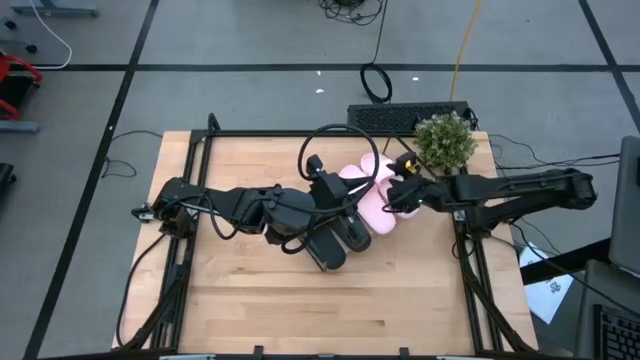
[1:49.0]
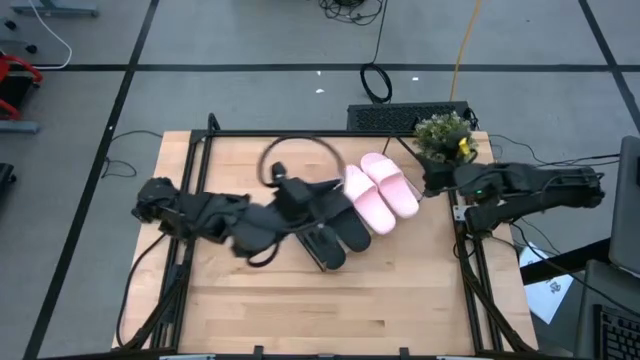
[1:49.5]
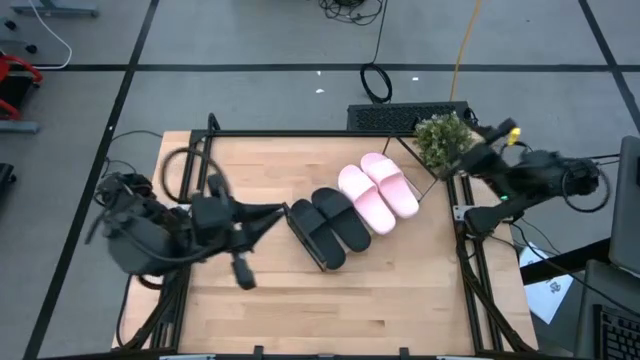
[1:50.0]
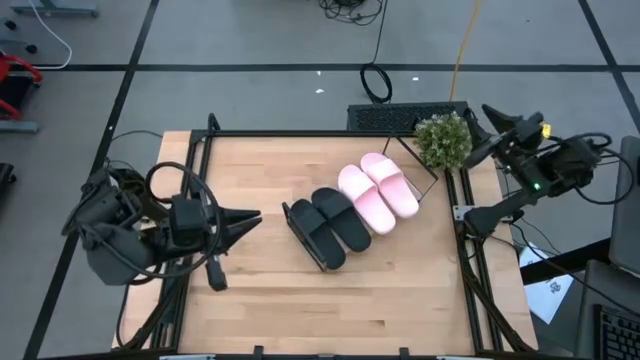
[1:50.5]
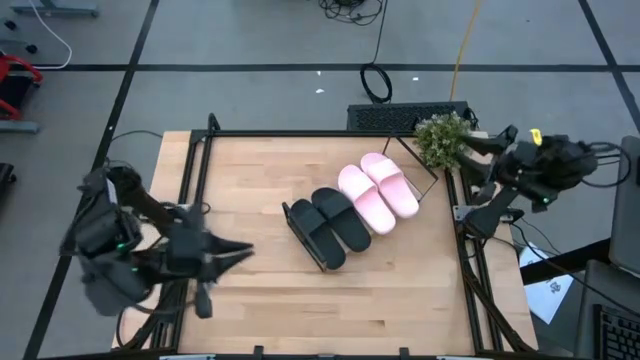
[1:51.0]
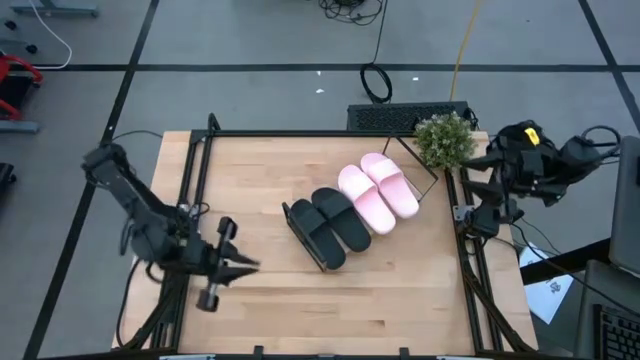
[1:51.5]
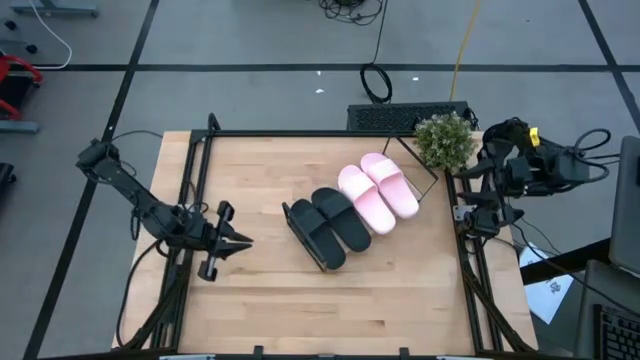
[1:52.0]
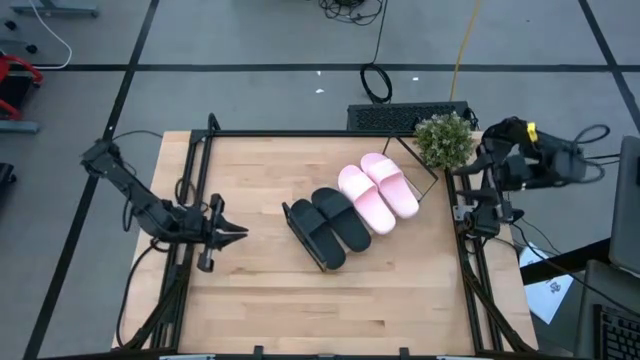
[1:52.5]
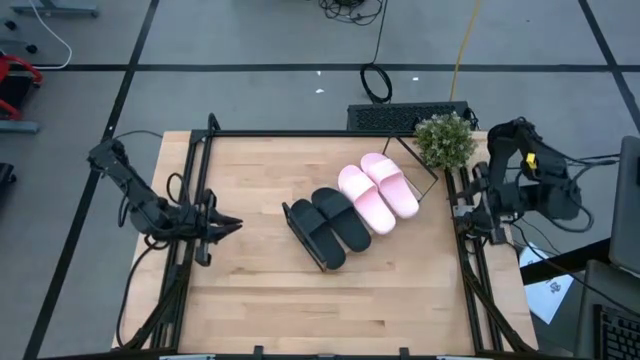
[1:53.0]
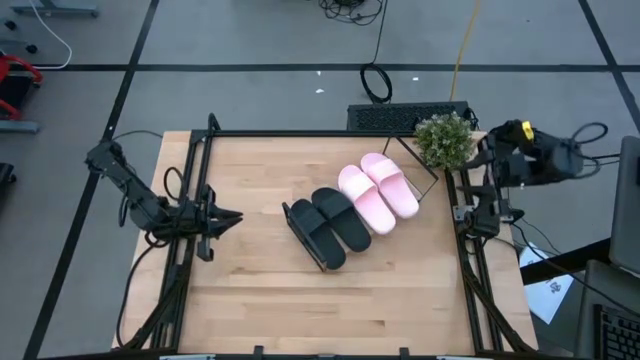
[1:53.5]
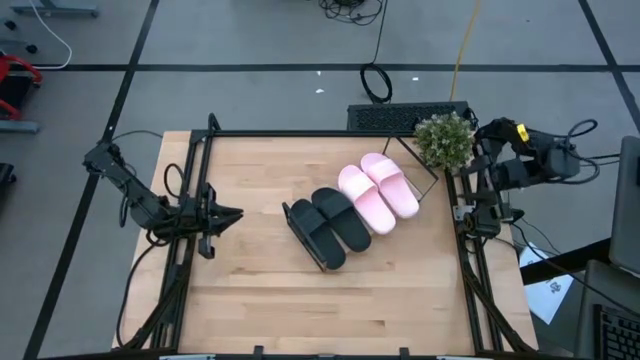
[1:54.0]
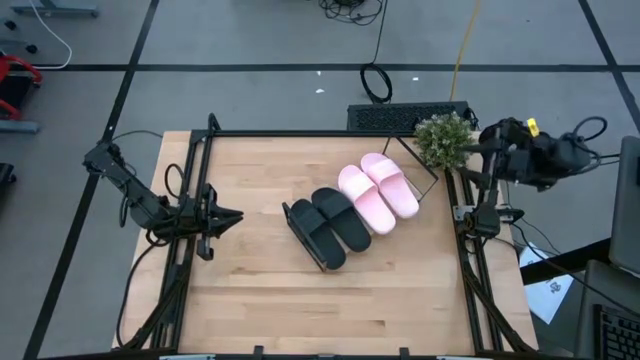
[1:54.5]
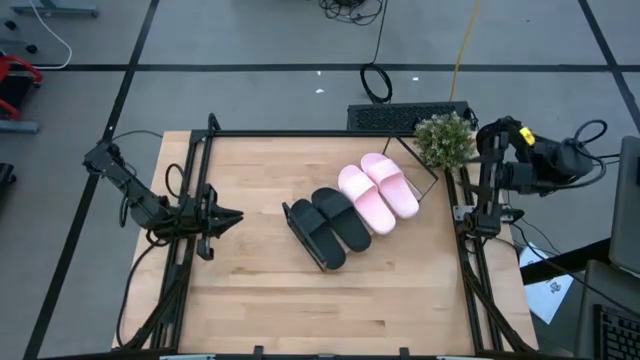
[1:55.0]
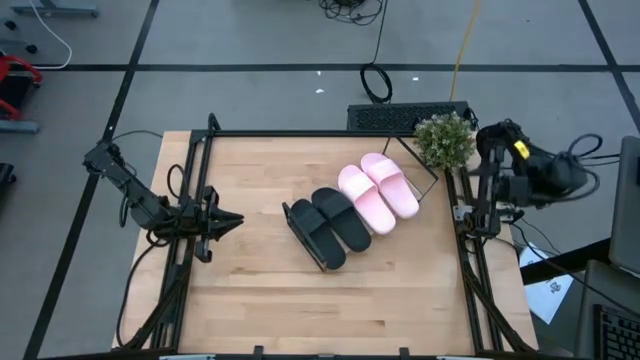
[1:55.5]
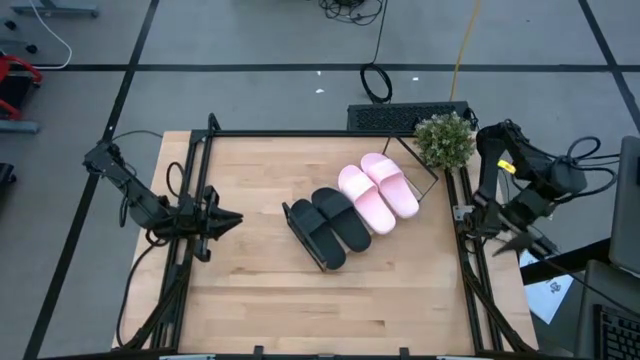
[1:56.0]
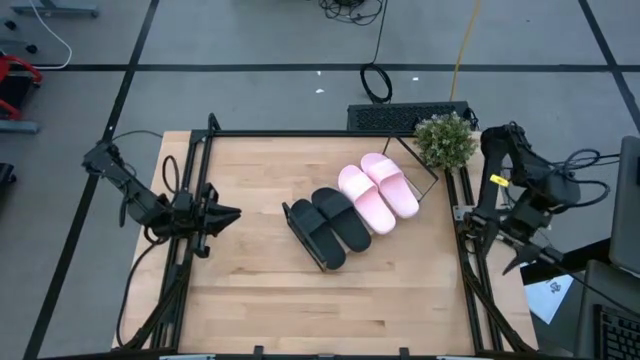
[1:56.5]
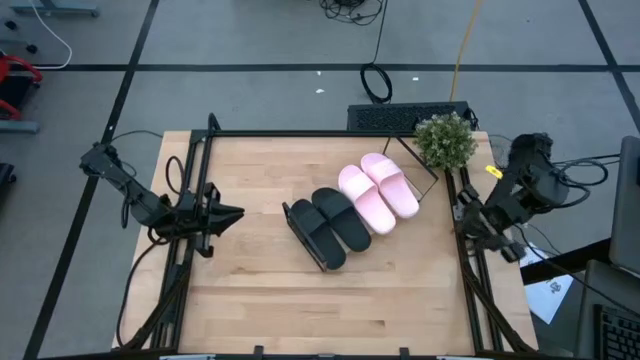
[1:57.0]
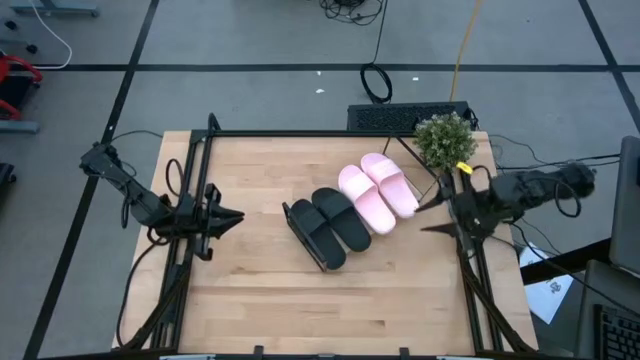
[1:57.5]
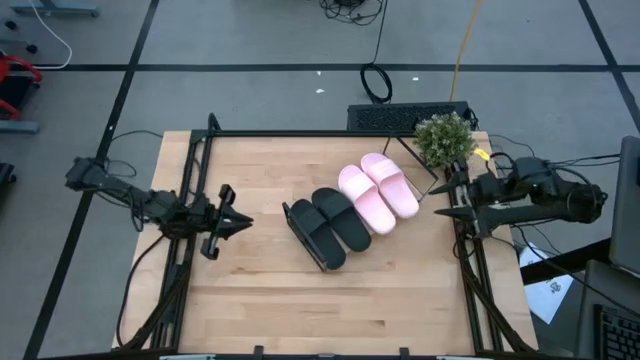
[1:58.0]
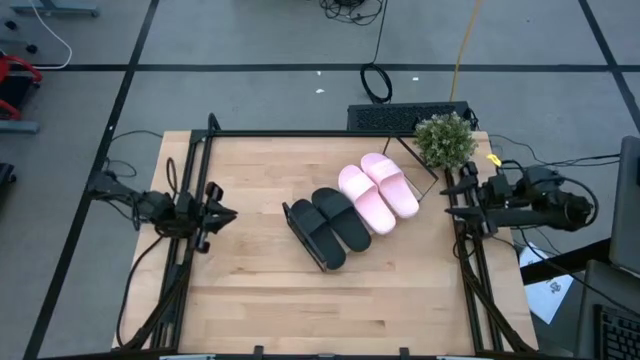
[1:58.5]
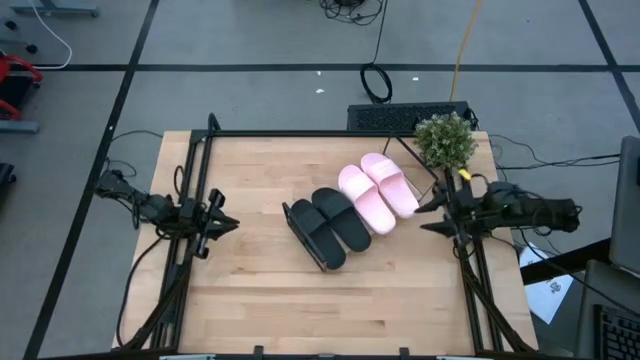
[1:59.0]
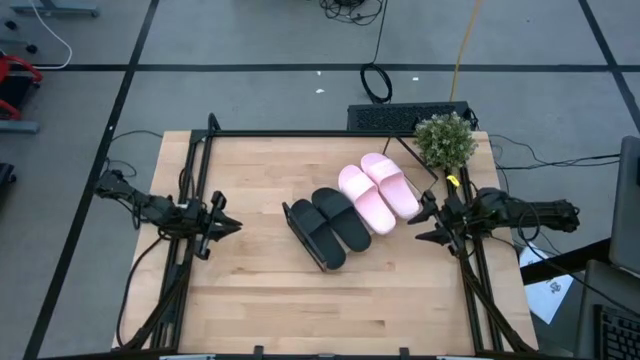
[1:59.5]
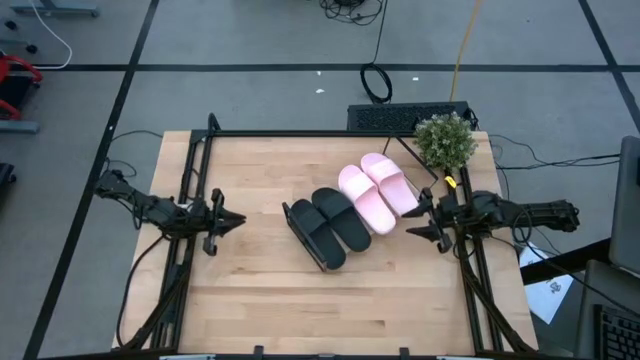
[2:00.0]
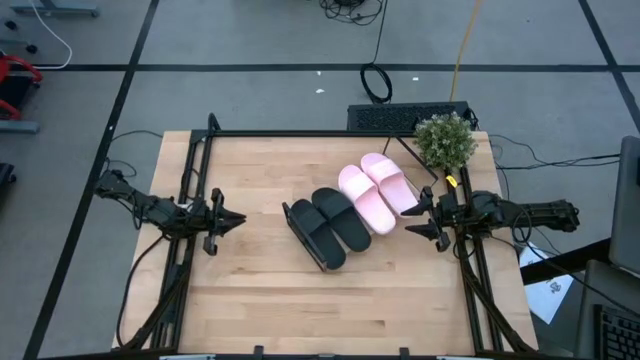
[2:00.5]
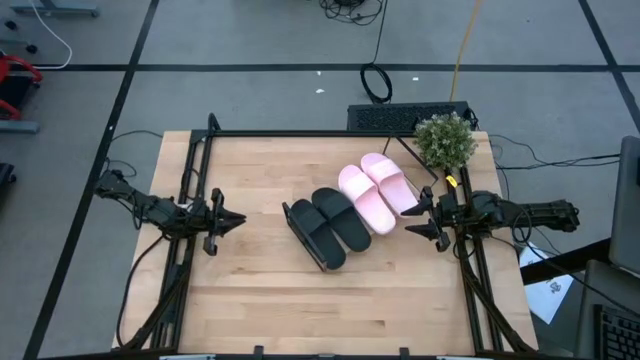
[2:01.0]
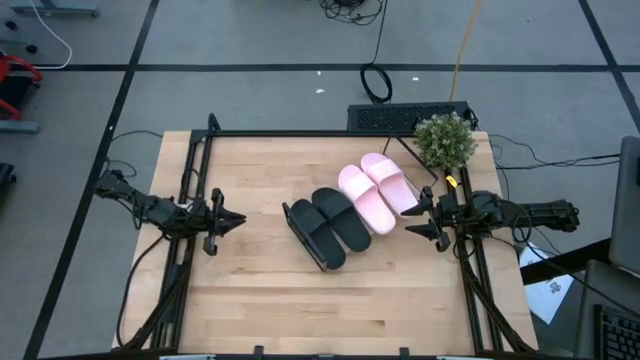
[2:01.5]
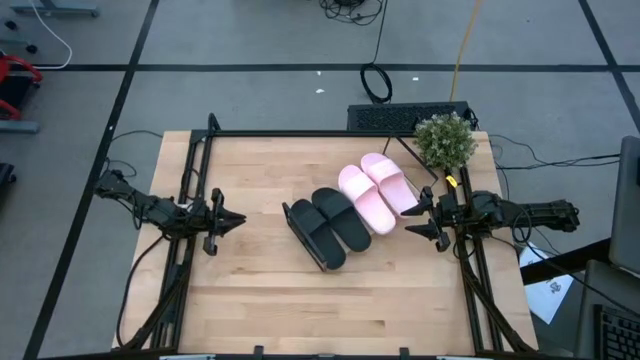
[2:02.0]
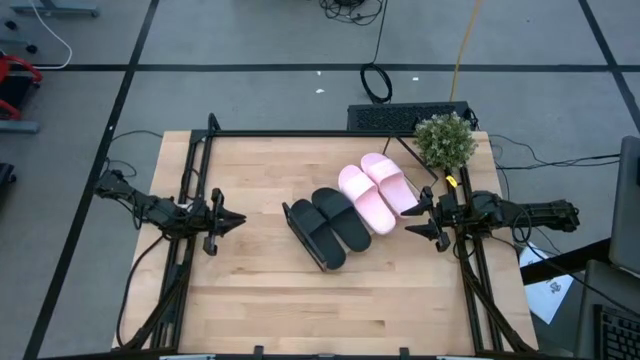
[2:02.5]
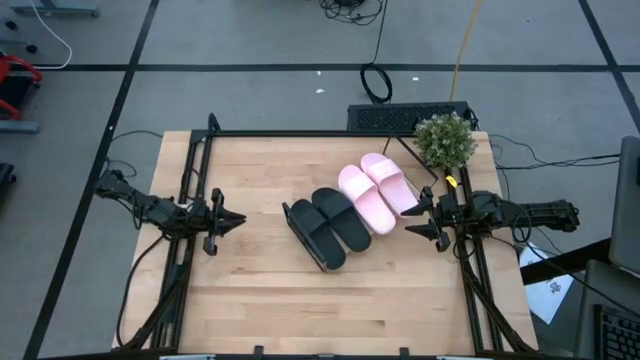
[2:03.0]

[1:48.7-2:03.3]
Task: Pick and place slides into the shelf
Return to Home Position

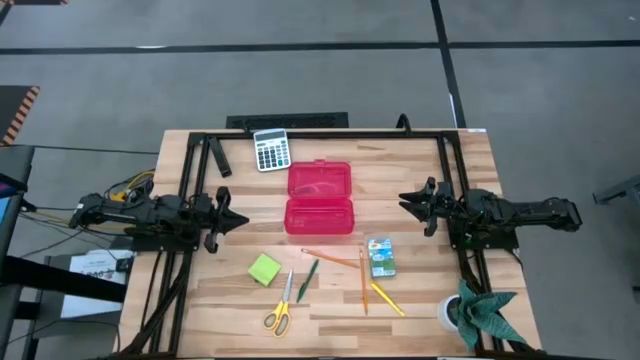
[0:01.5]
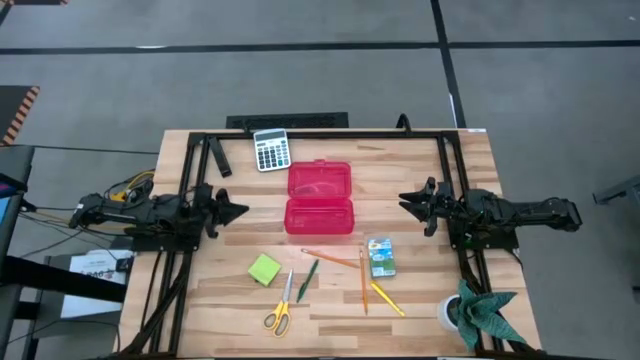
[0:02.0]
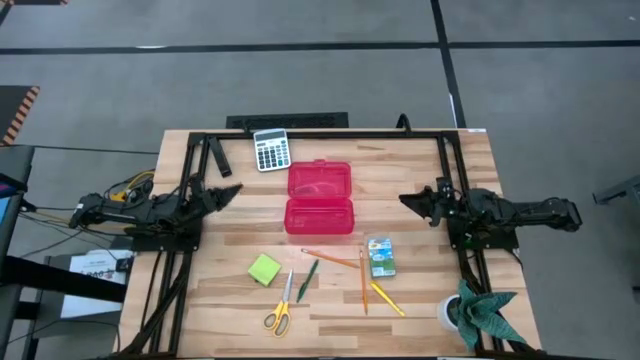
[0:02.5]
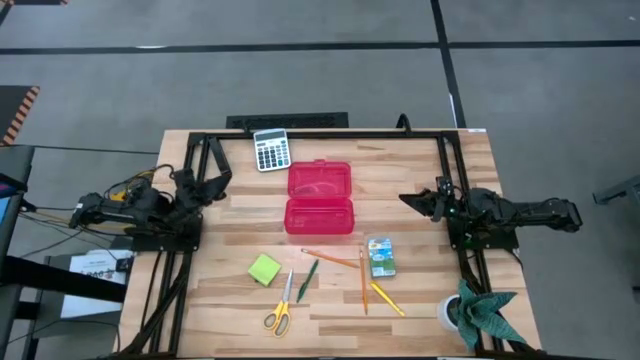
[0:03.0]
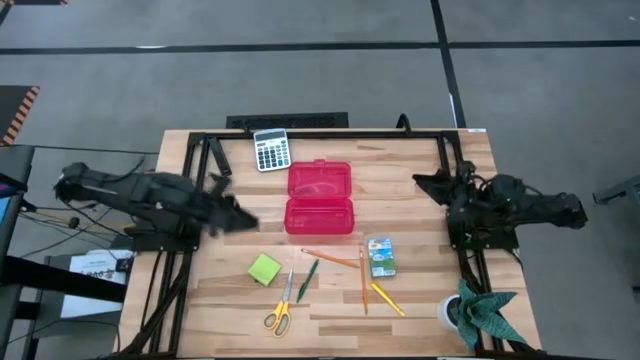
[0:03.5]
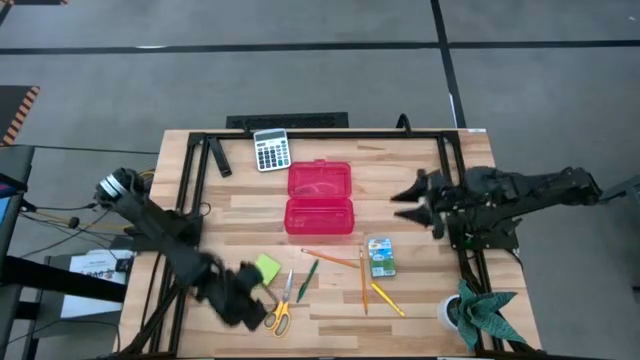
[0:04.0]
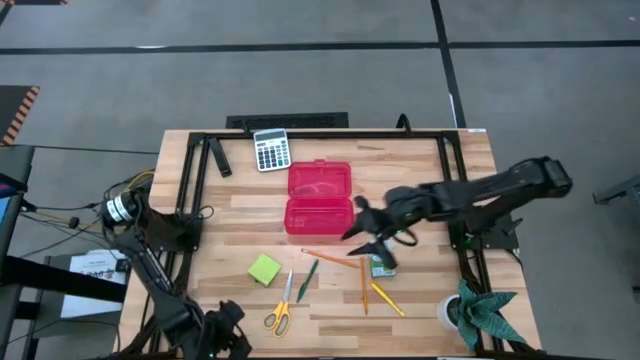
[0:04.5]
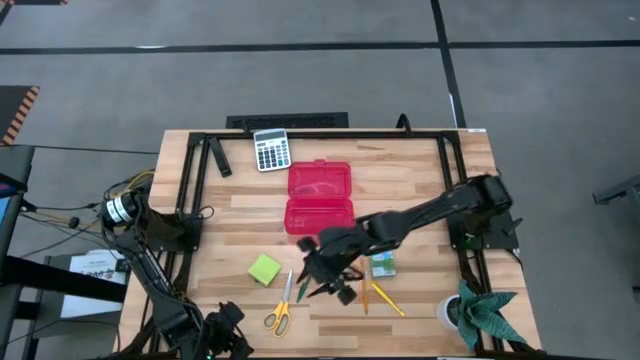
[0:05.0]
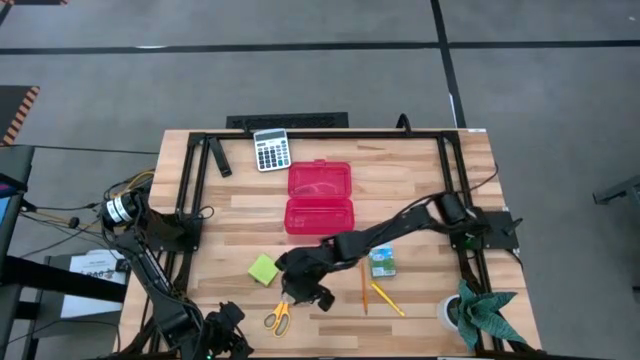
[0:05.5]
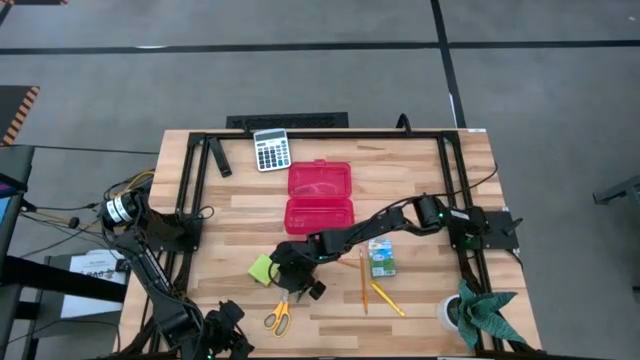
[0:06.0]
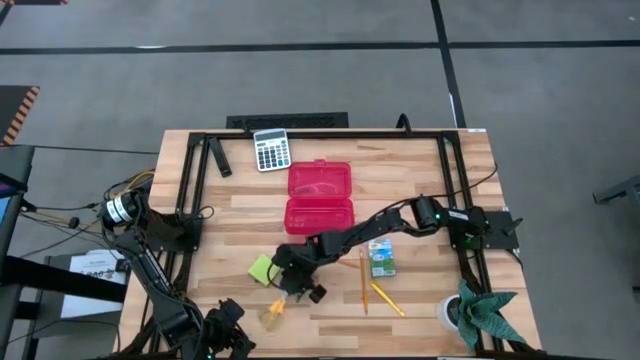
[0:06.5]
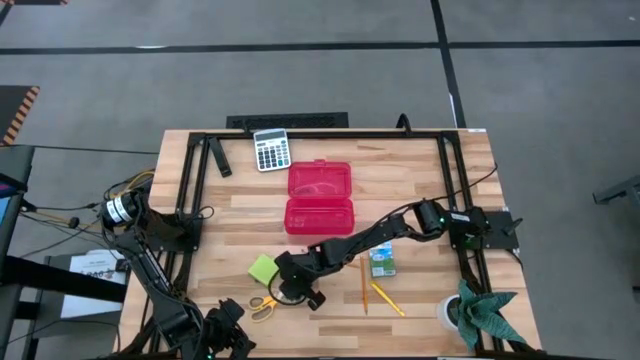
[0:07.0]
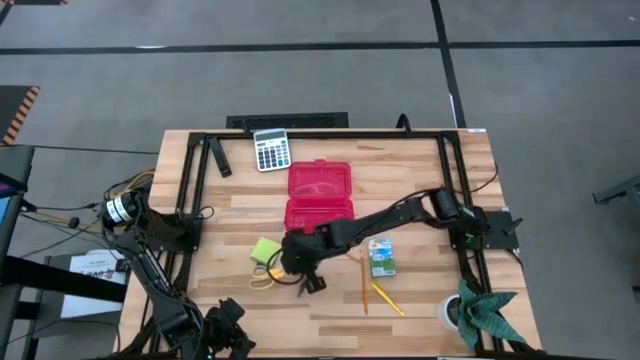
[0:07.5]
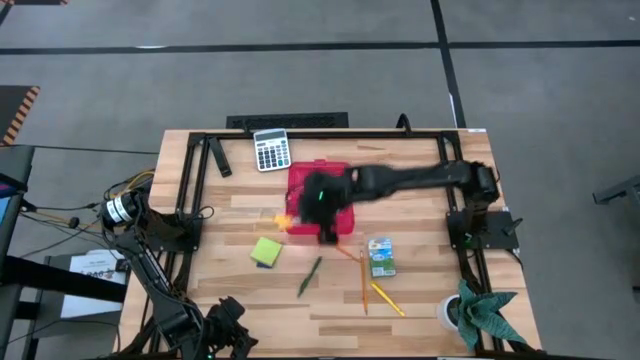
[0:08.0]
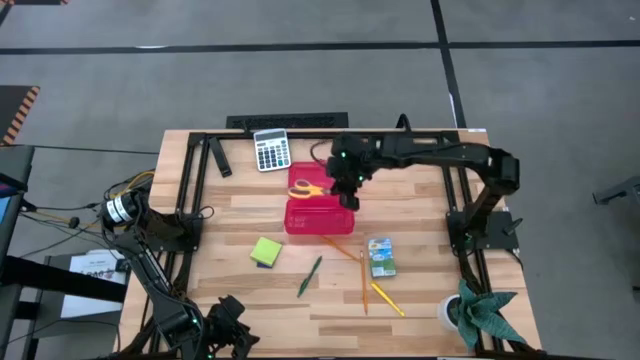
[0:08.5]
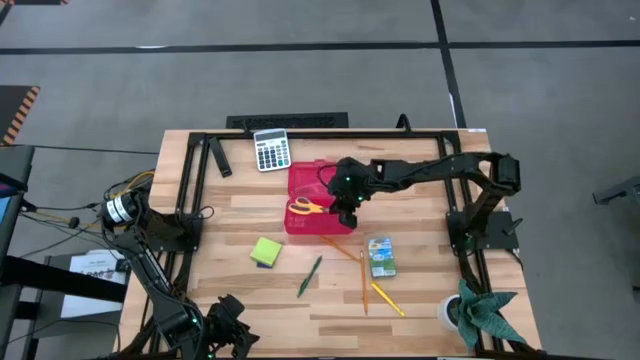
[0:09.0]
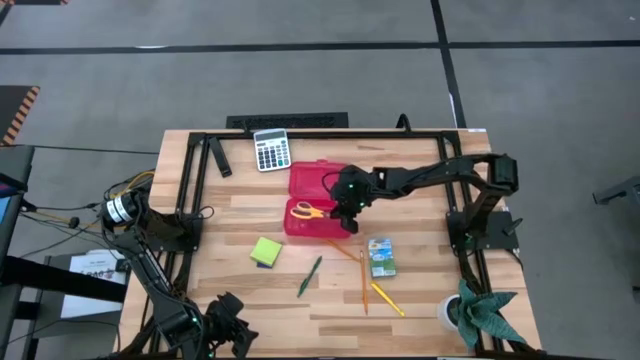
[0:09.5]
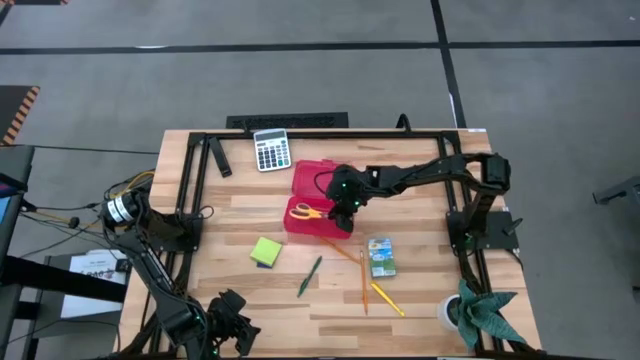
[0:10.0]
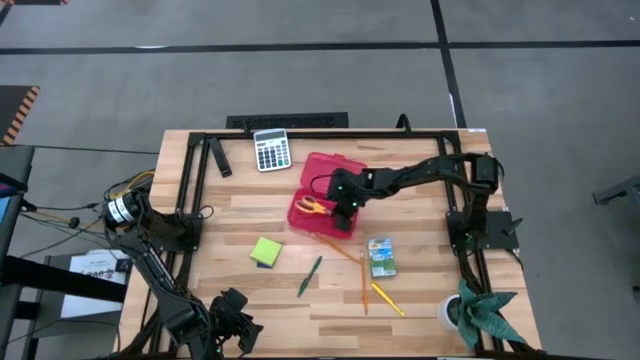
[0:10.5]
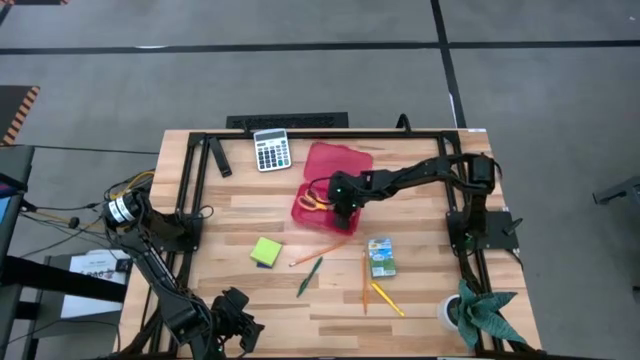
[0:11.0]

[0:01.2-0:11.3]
Task: Pack school essentials
Put the scissors into the supply box
